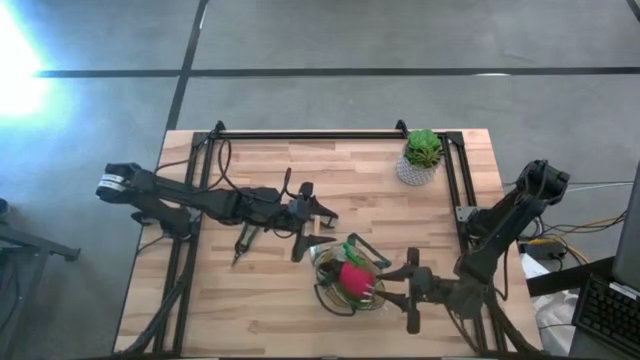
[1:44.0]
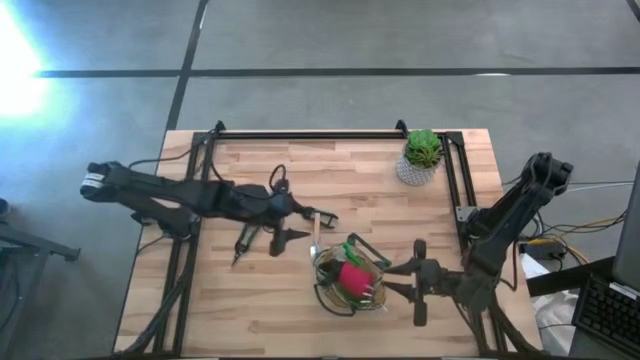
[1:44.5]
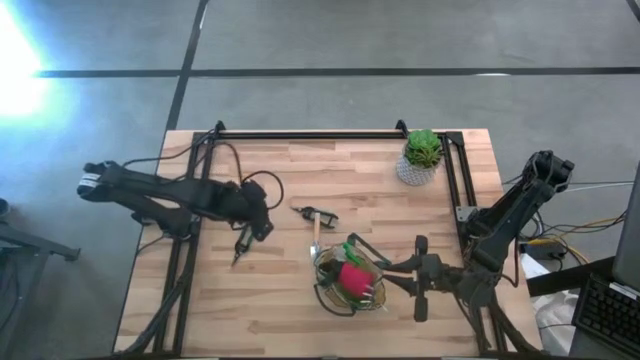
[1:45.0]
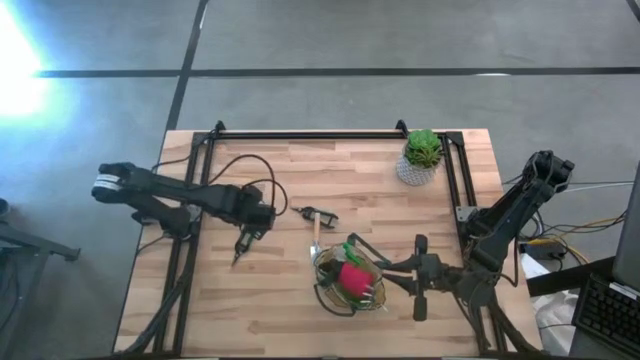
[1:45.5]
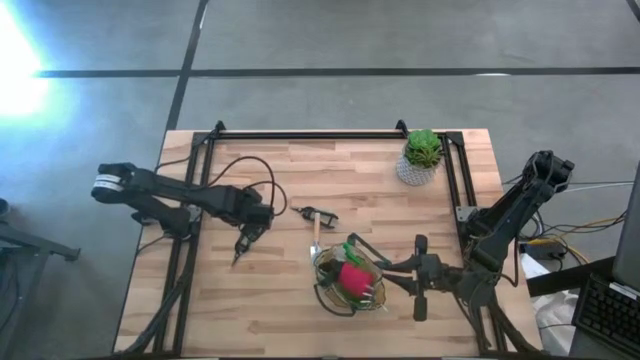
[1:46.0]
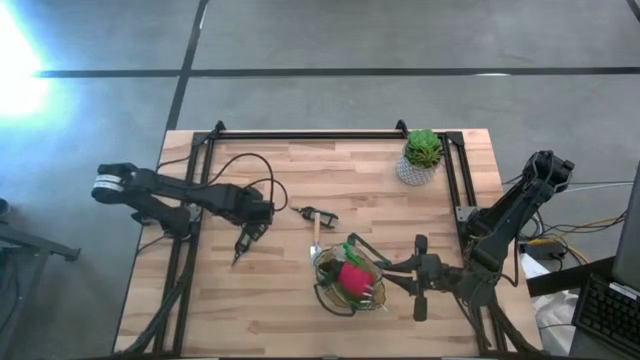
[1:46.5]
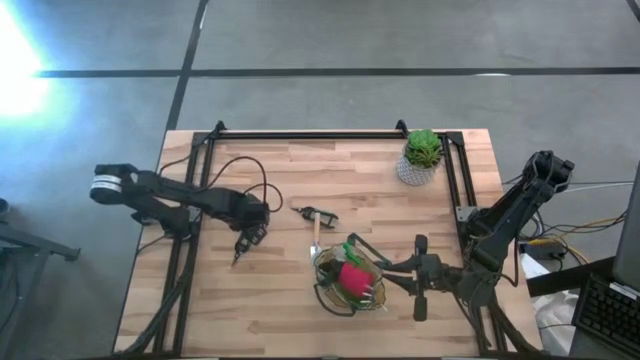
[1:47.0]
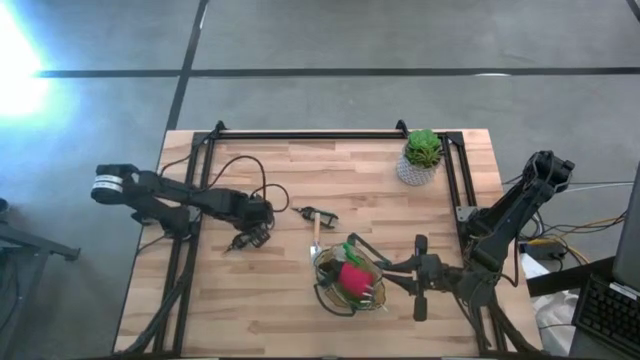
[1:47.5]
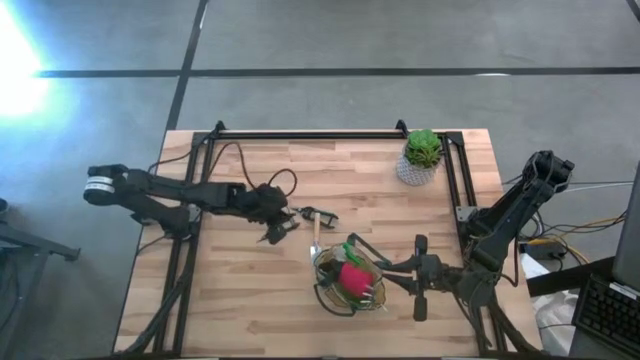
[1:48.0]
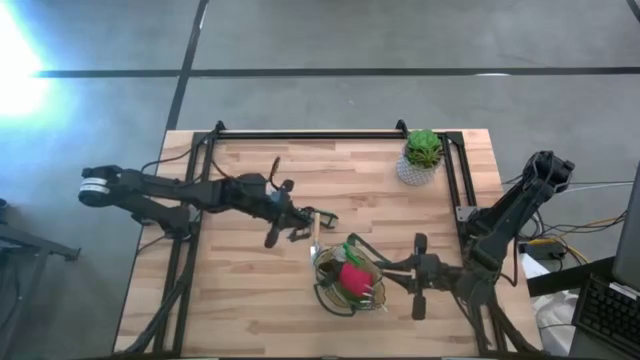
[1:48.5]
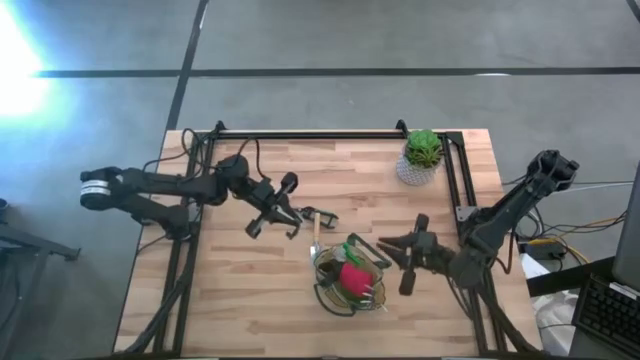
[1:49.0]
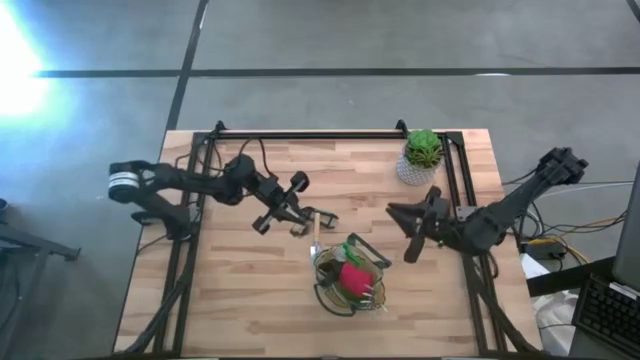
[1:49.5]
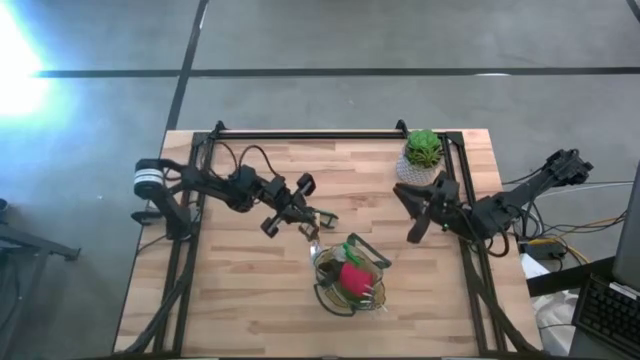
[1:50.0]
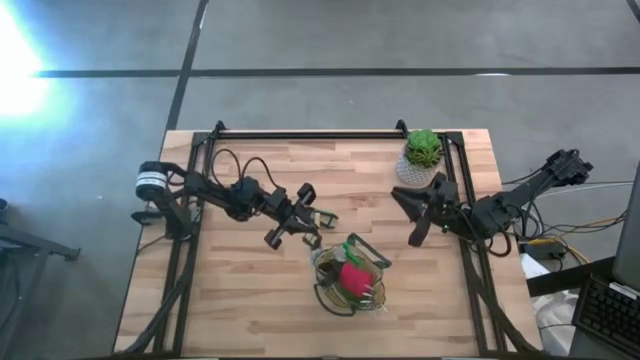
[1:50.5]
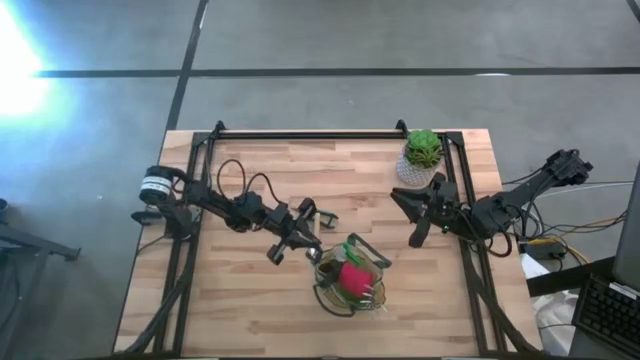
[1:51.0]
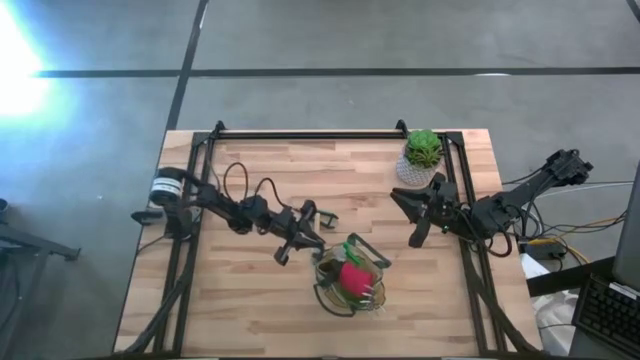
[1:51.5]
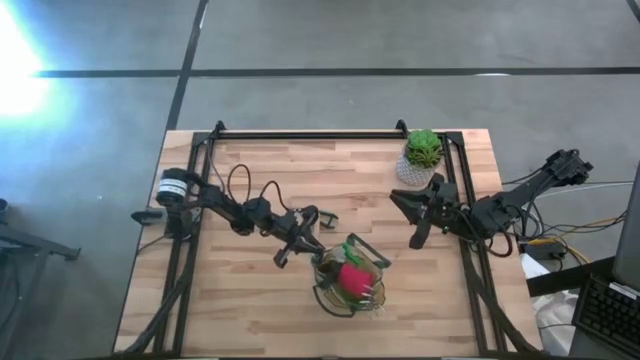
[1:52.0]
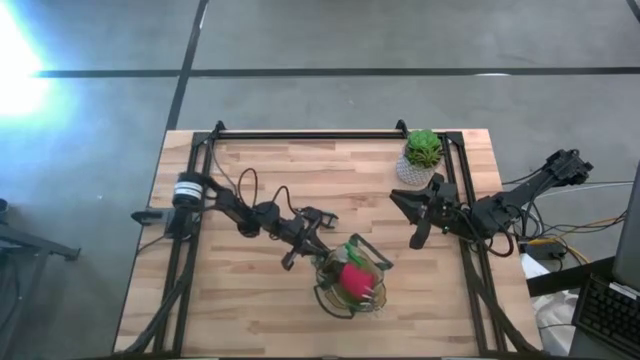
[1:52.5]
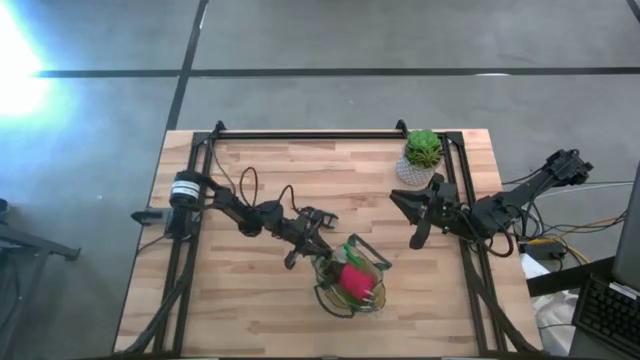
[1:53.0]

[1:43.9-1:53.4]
Task: Pick & Place Garden tools in Gardening bag
Put the left green shear scissors into the white gardening bag

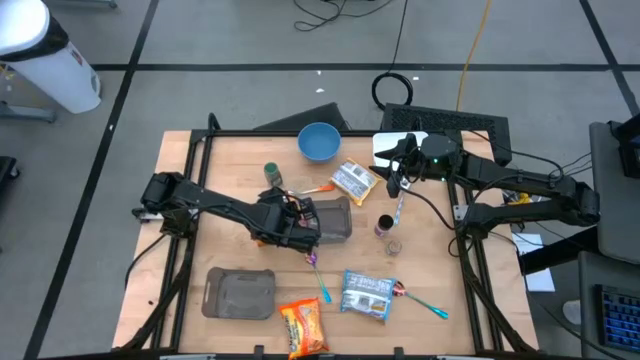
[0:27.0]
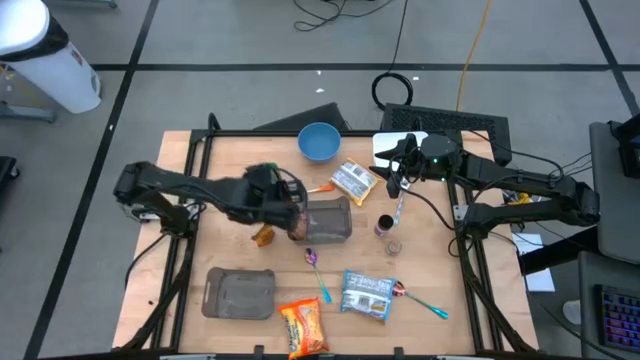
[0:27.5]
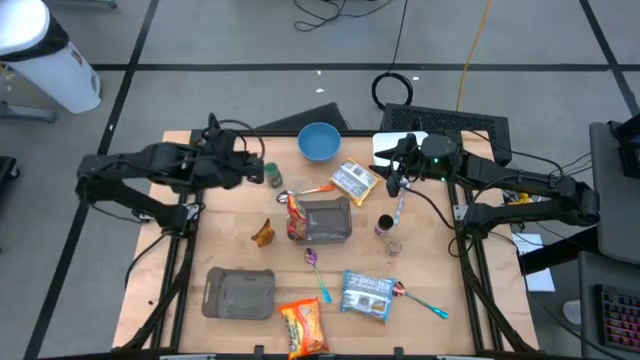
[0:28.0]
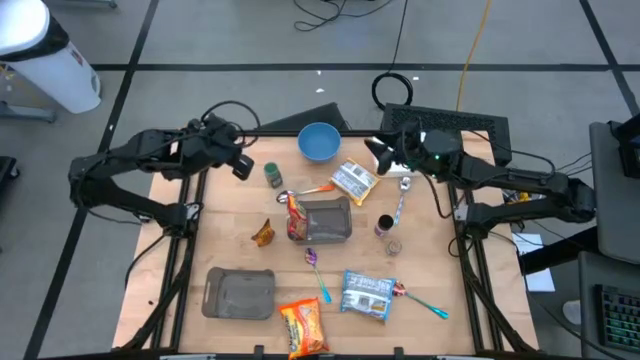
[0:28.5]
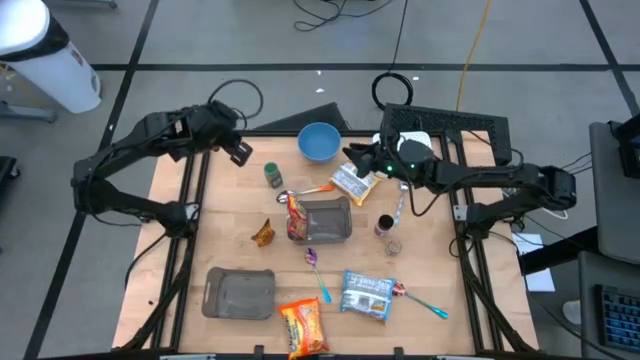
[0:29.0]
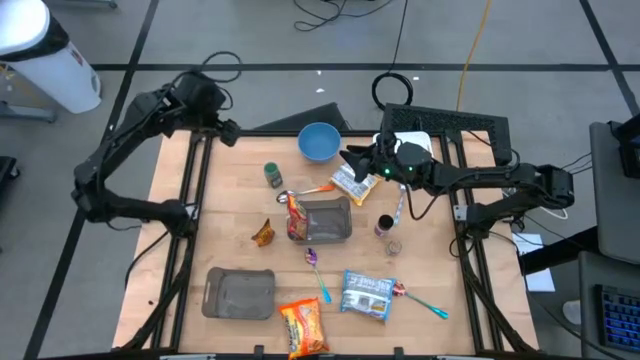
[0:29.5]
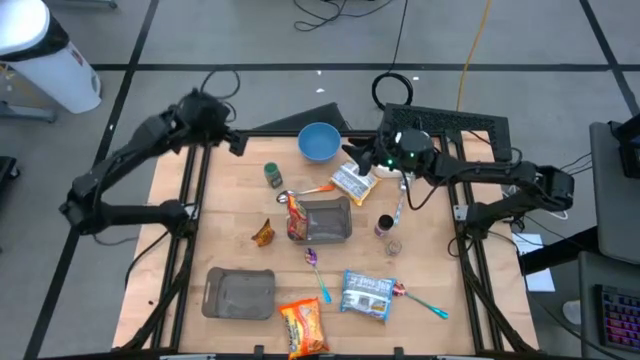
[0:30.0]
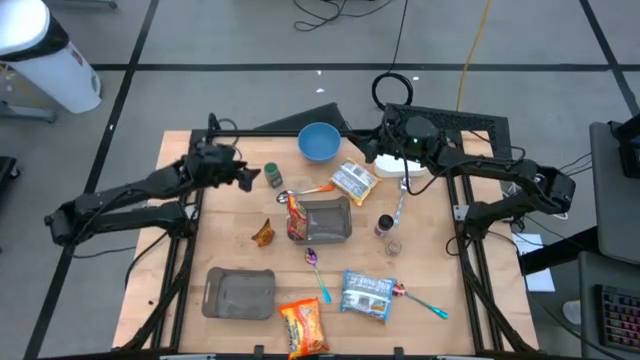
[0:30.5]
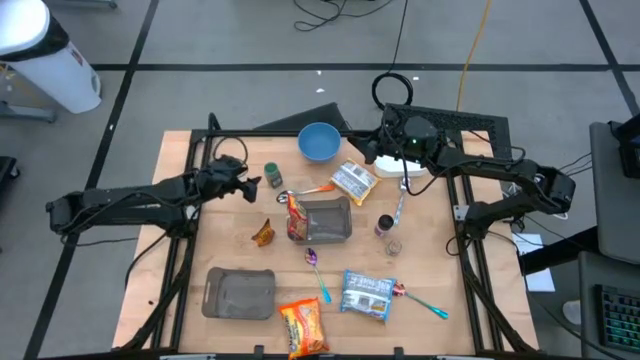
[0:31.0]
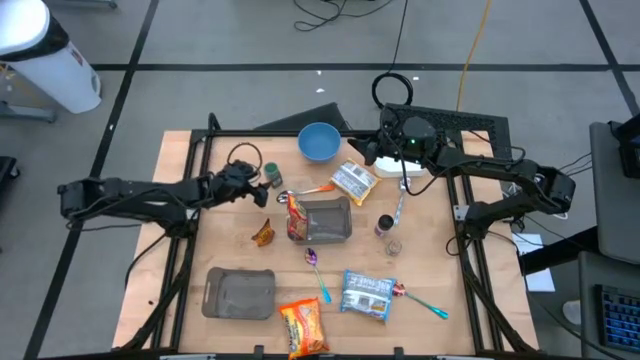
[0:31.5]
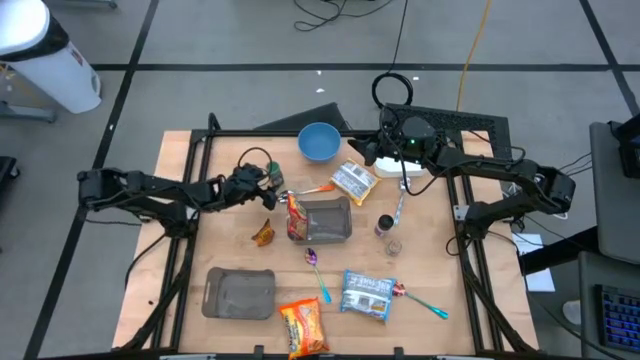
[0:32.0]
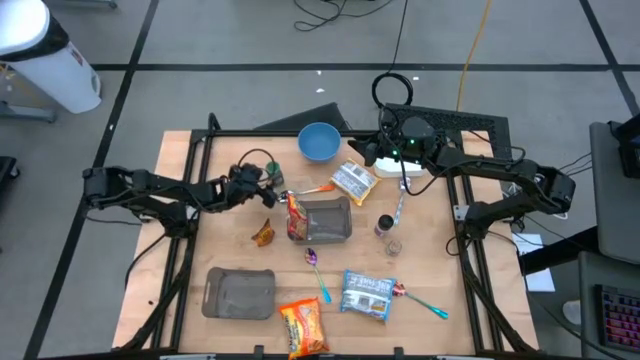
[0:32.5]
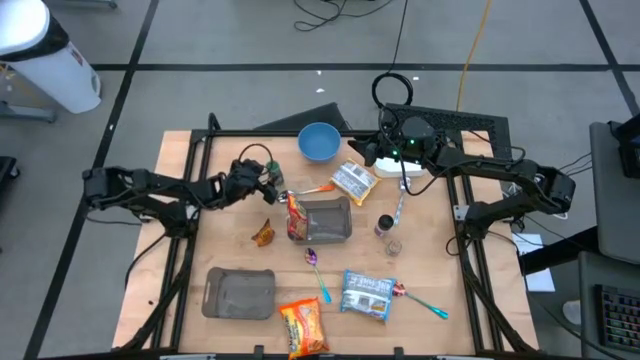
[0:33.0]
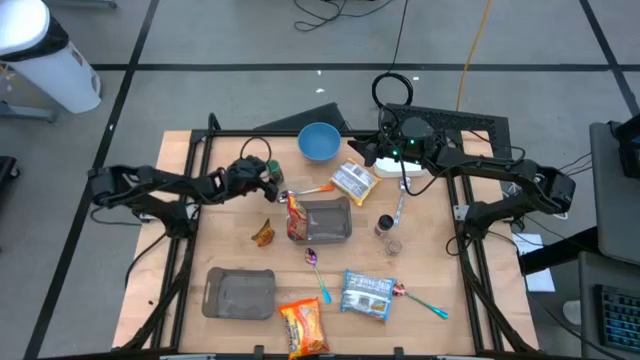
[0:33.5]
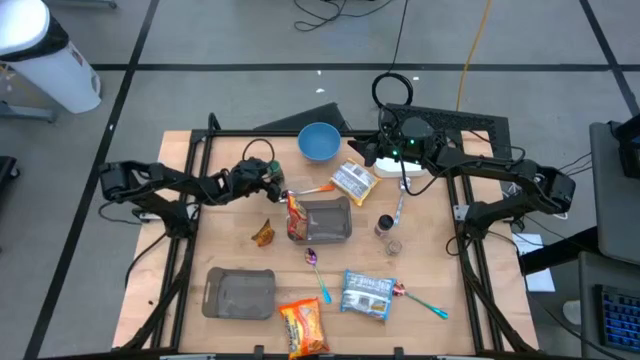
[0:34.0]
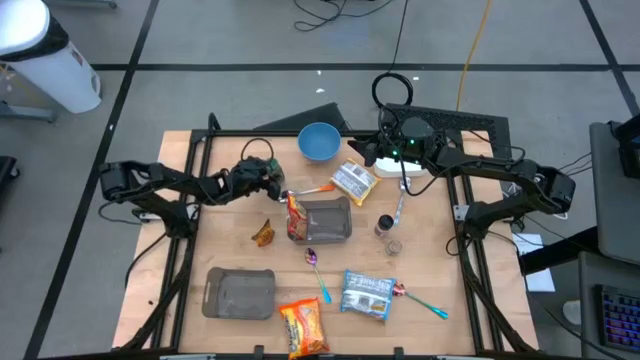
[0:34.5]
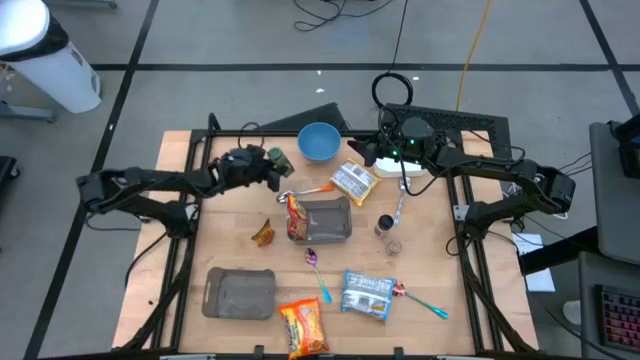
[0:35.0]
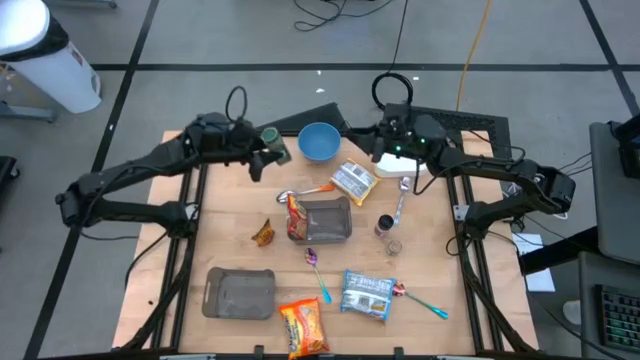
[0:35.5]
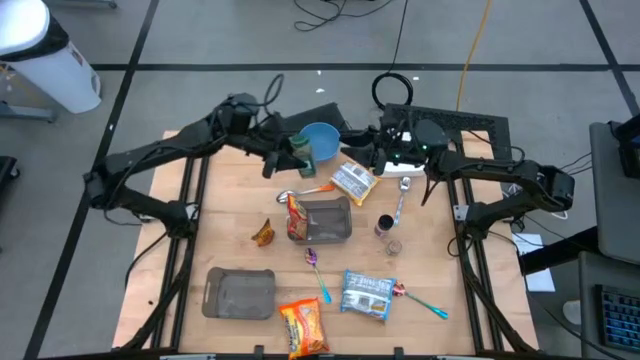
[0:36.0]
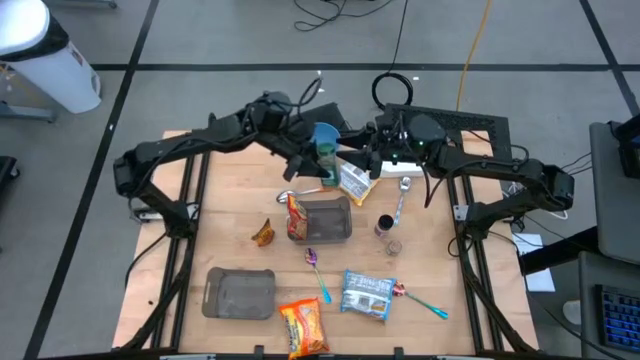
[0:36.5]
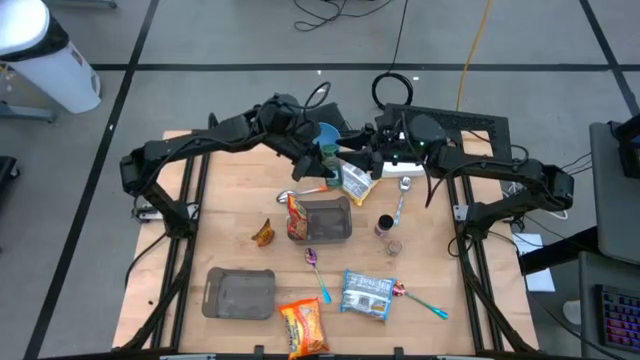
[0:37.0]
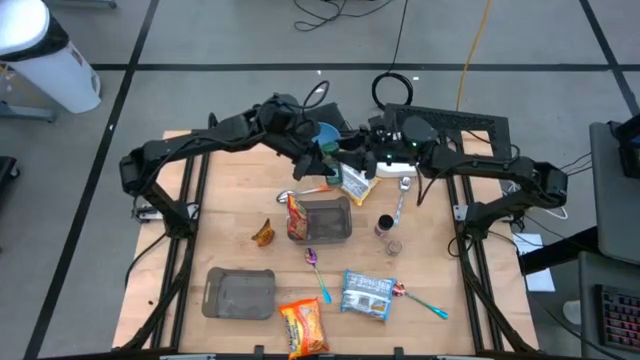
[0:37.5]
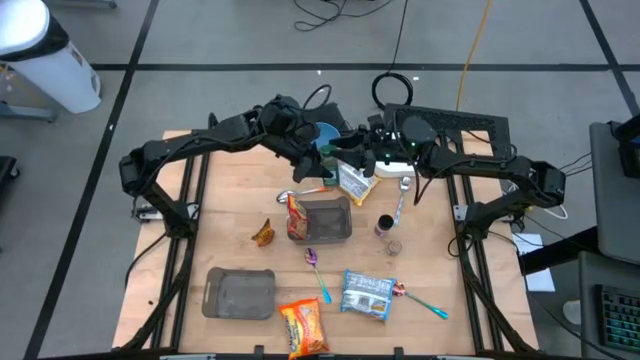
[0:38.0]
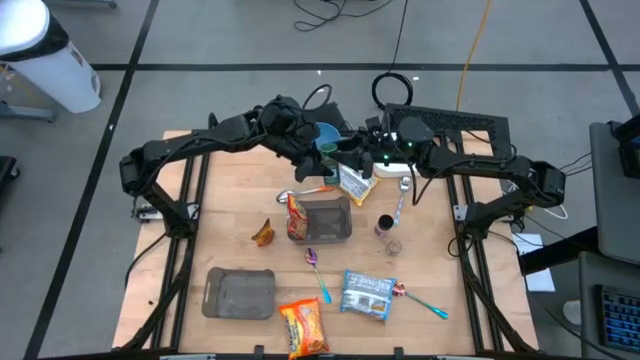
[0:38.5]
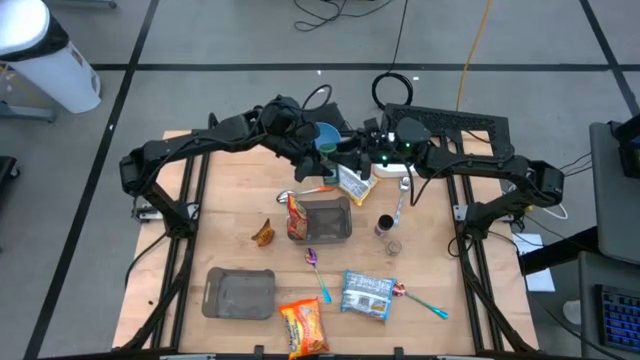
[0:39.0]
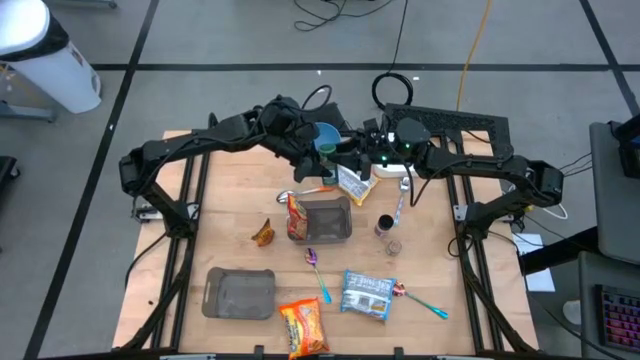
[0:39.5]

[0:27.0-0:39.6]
Task: Pick & Place Food Item
Put the green seasoning bottle into the top white bin
